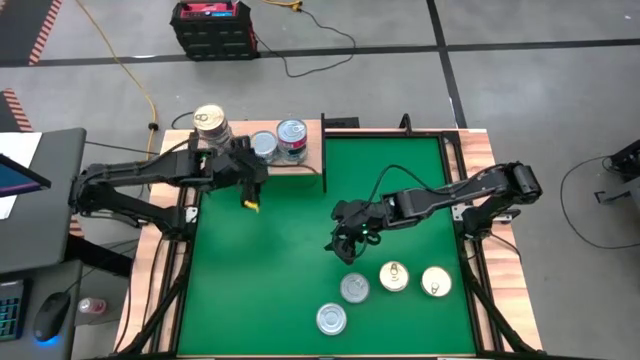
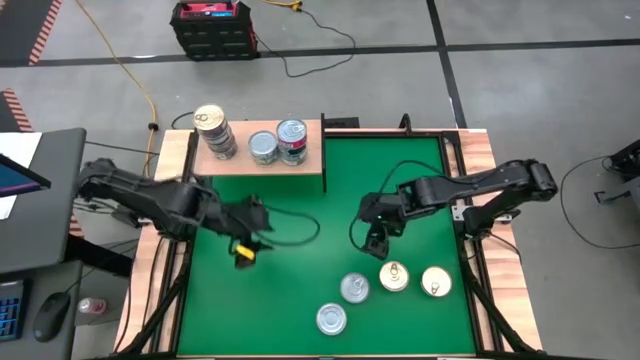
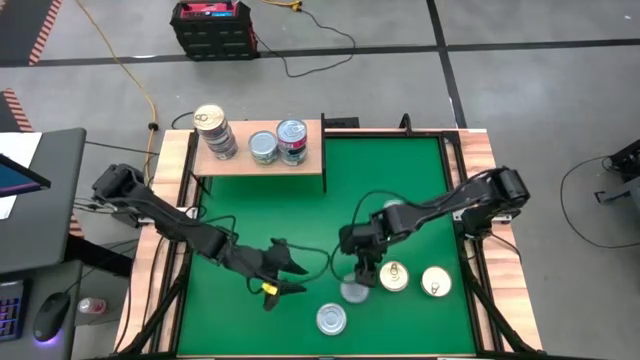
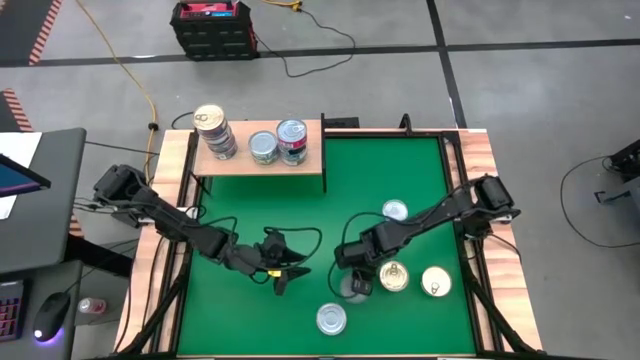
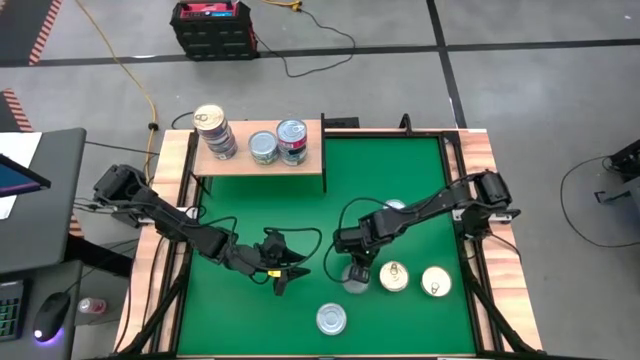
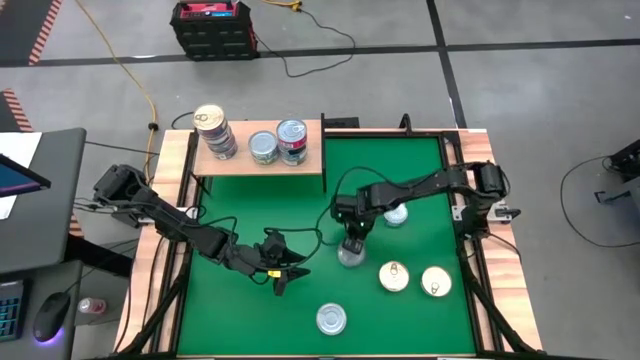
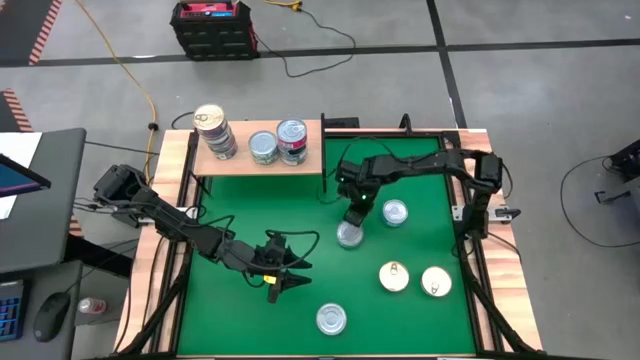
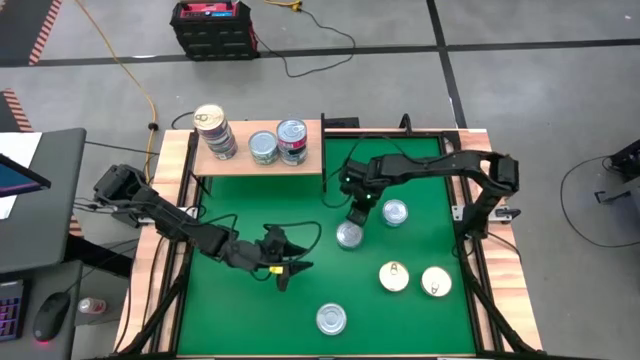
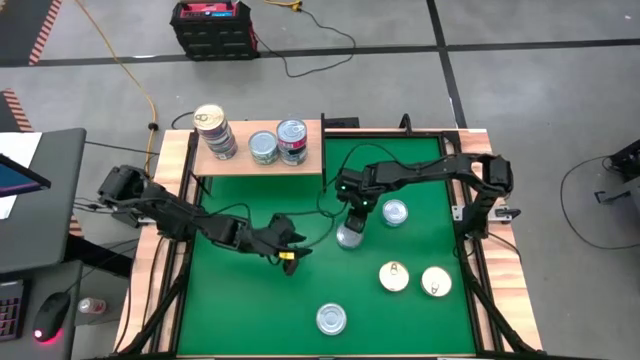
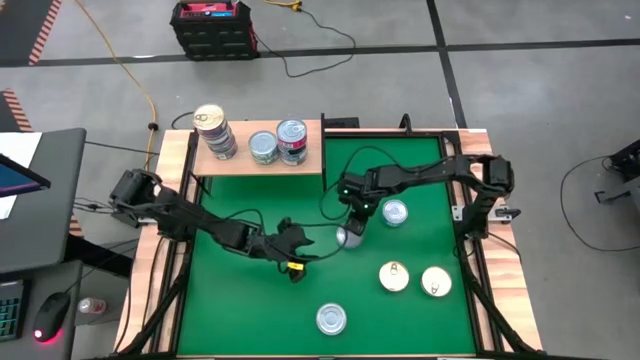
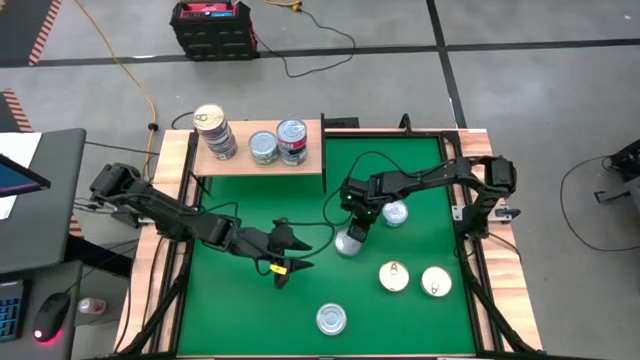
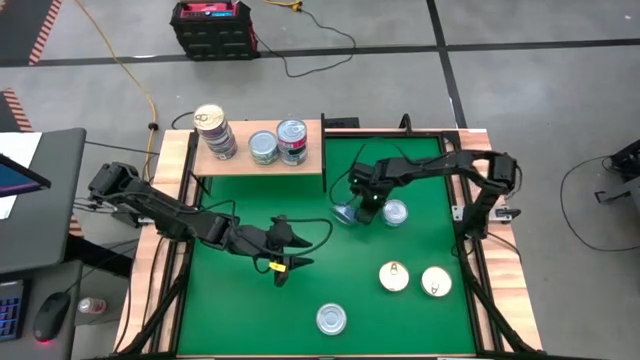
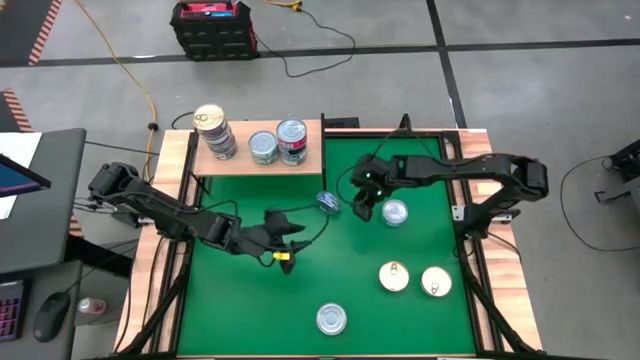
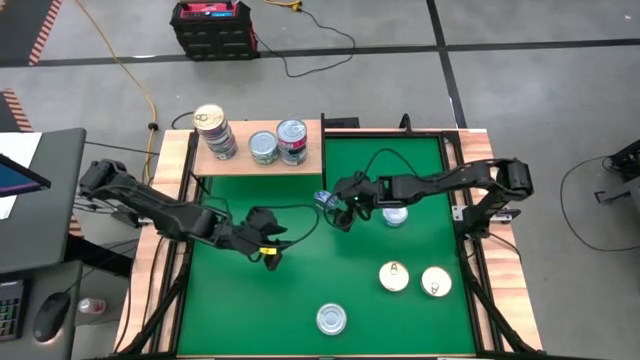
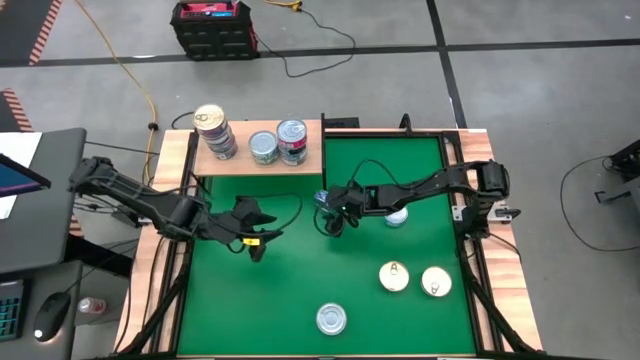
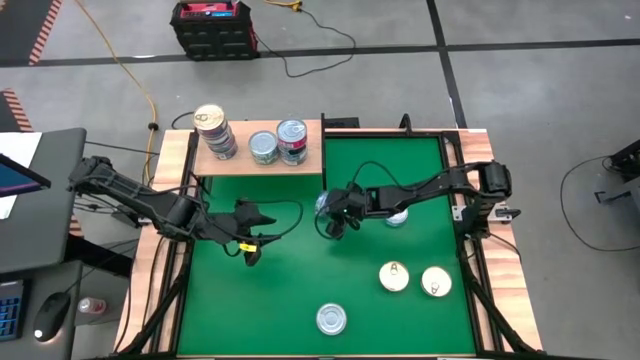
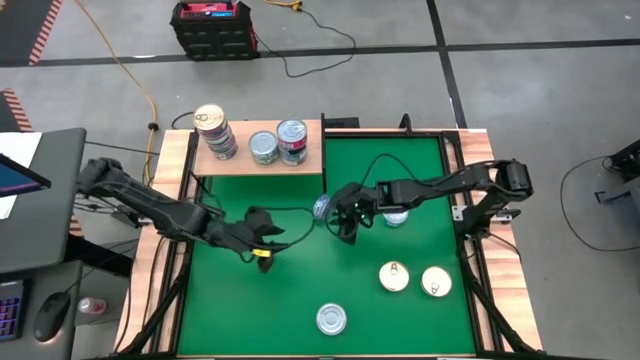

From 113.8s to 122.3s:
Task: Stack canned seafood by type on shelf
Stack the dark blue tuna can on top of the red tuna can on the shelf

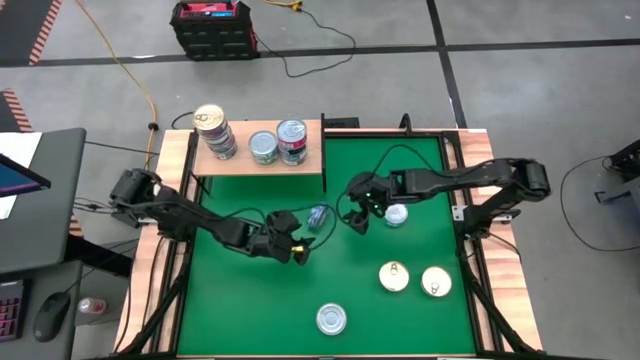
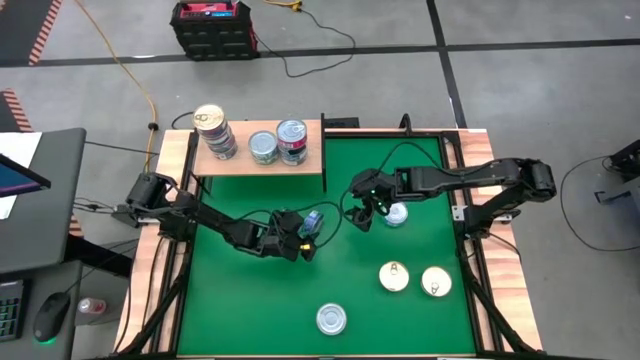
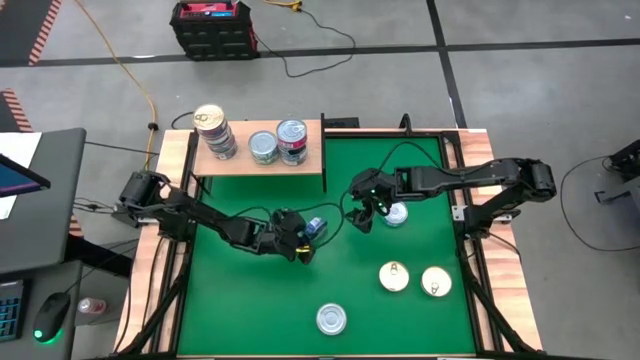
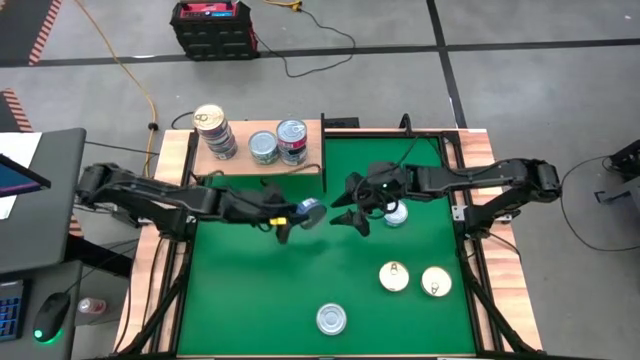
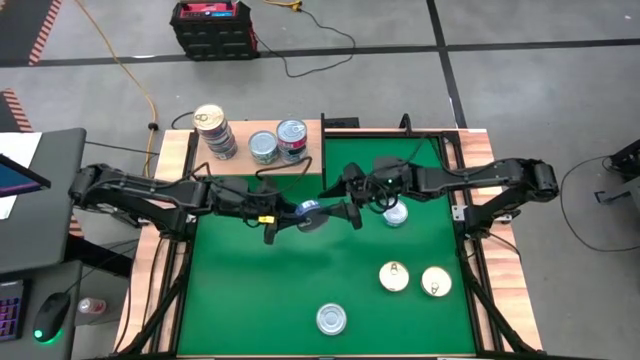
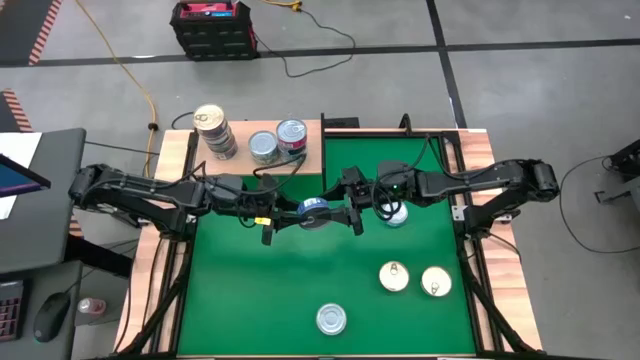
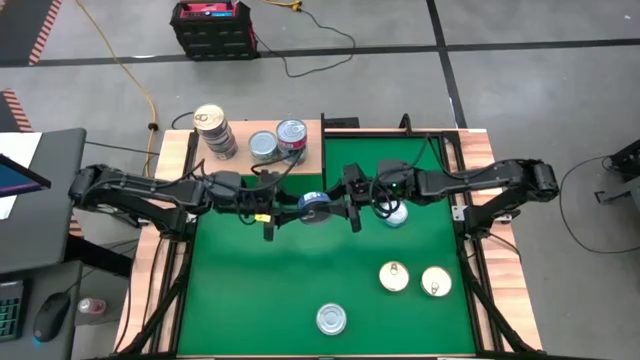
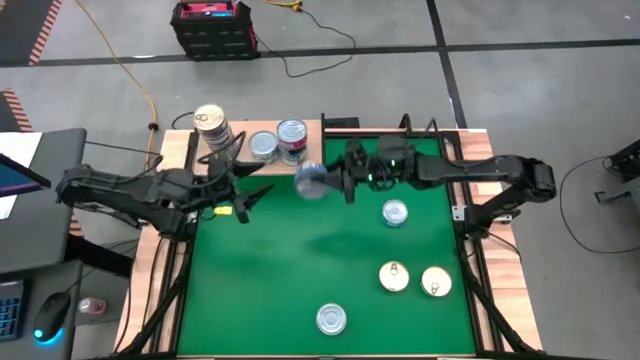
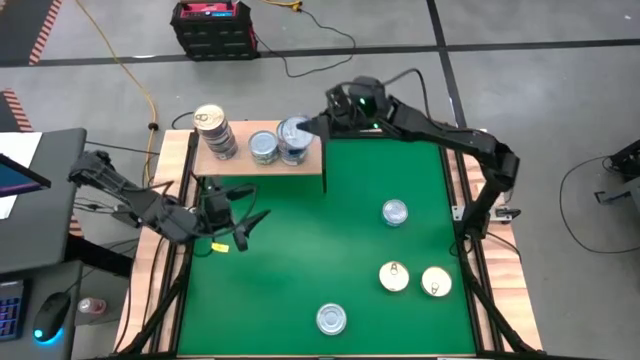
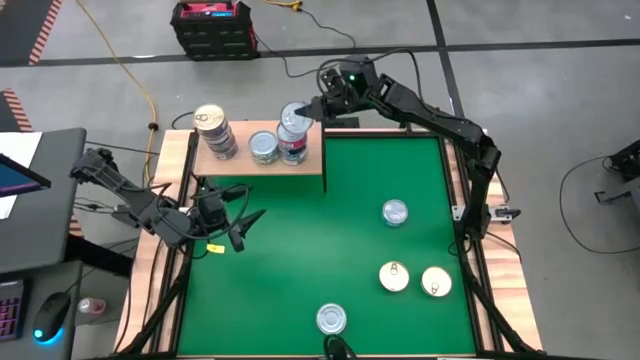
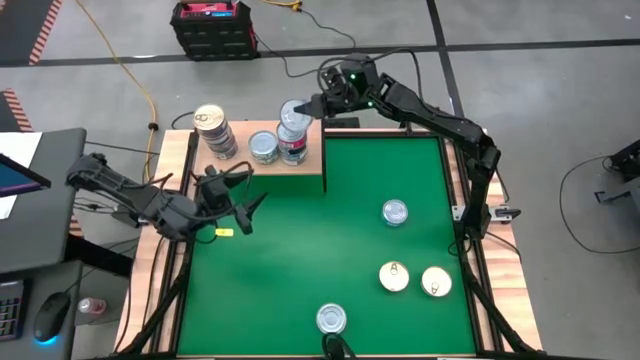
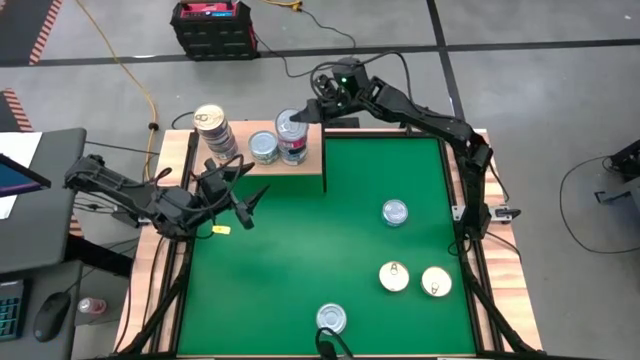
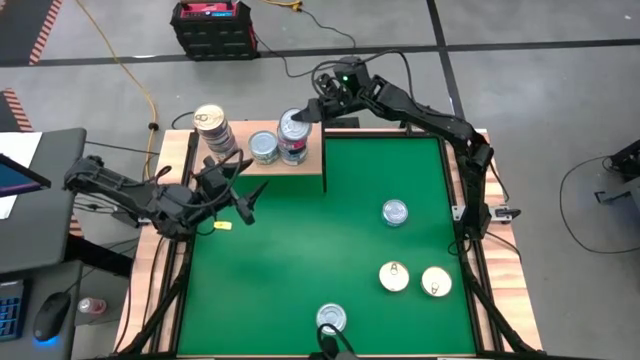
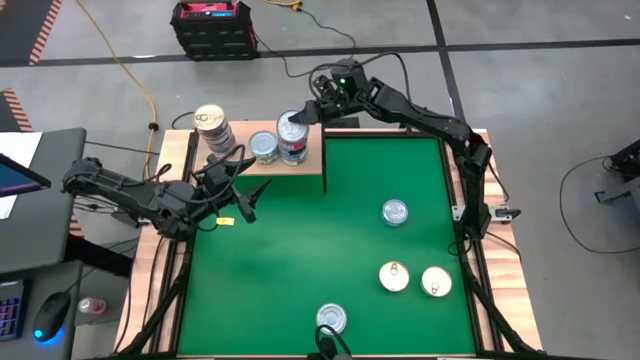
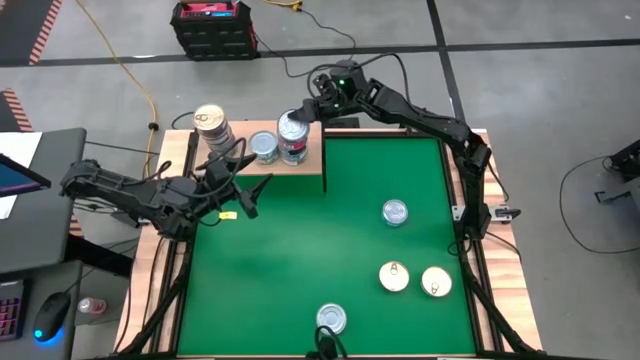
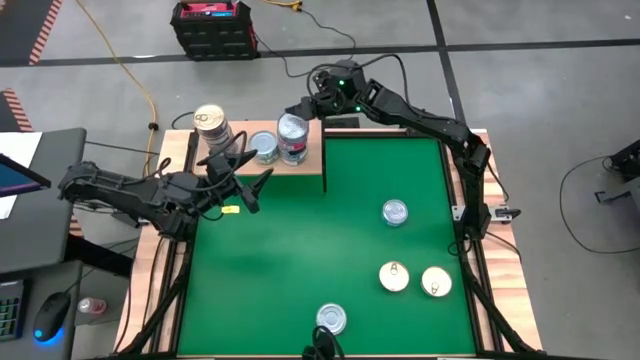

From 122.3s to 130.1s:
Stack the dark blue tuna can on top of the red tuna can on the shelf

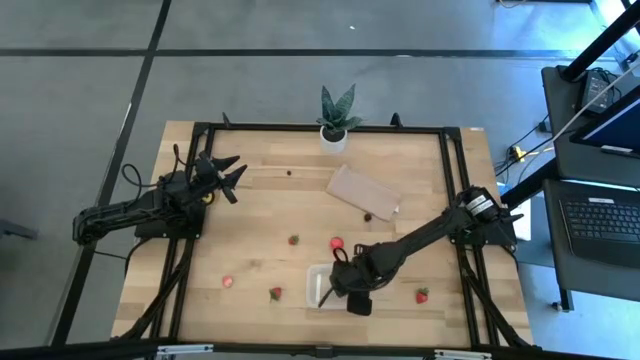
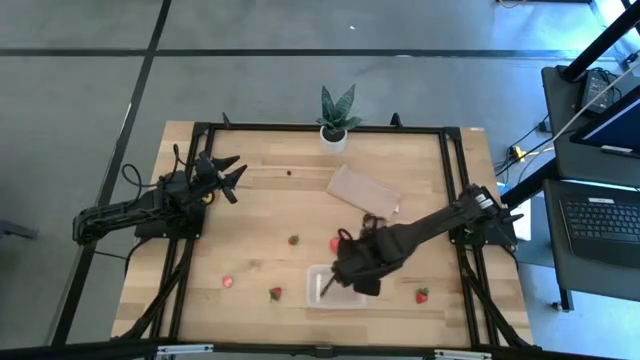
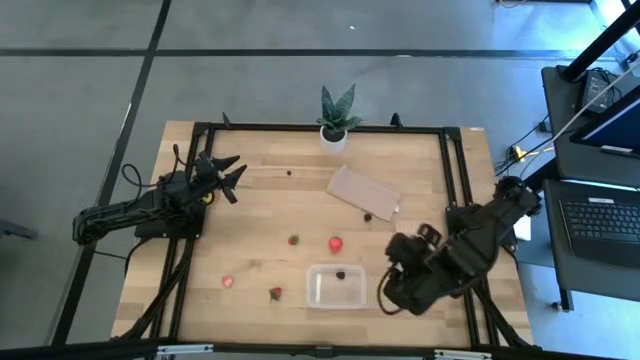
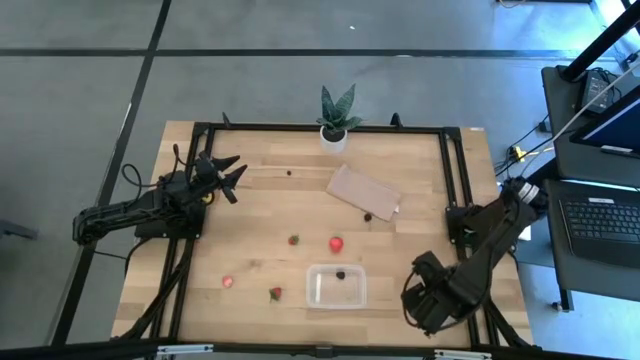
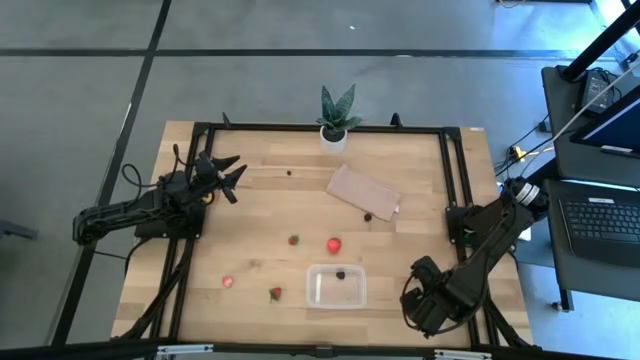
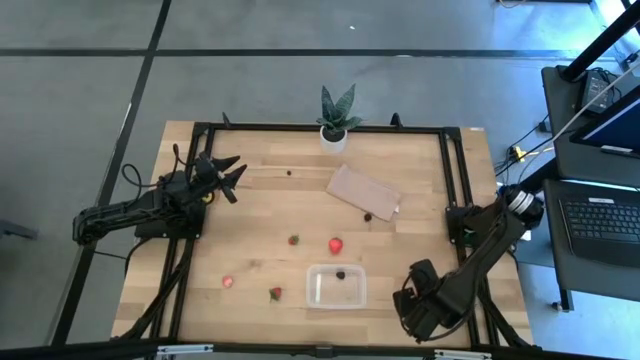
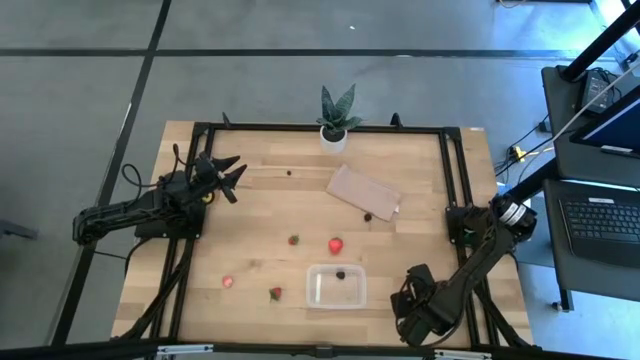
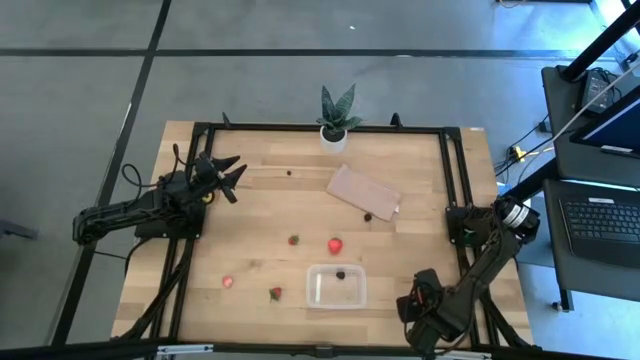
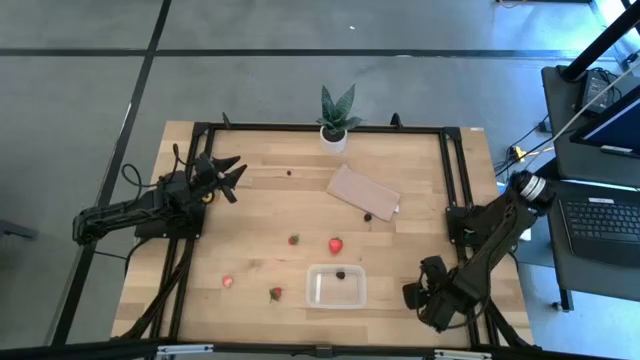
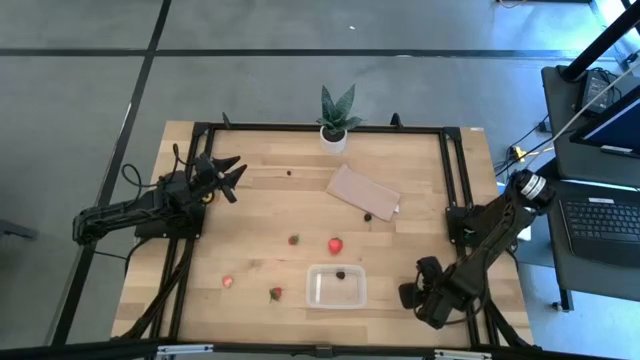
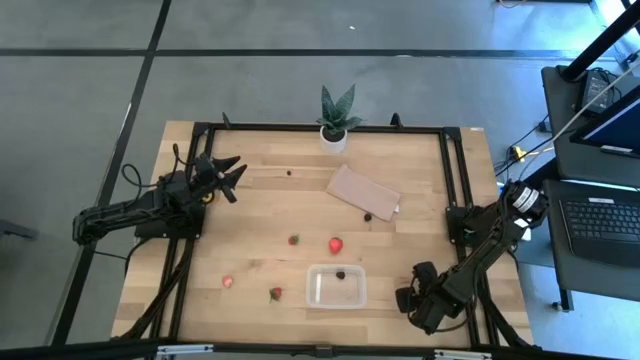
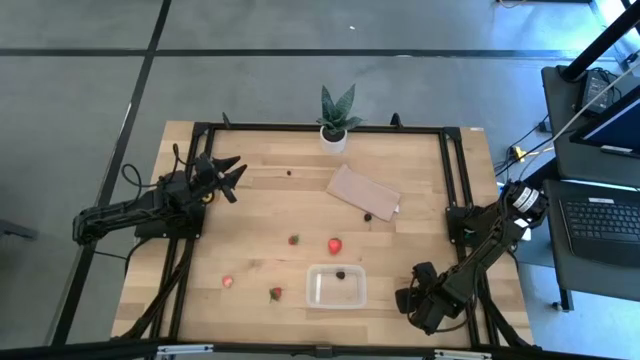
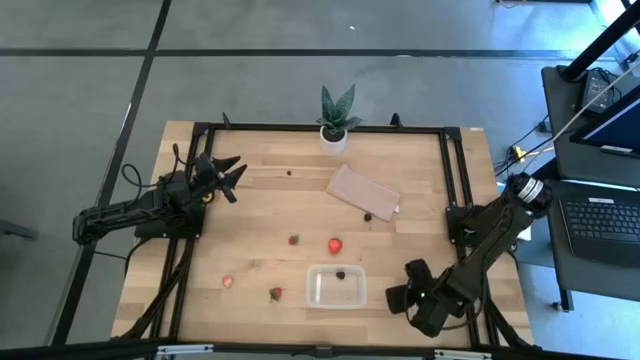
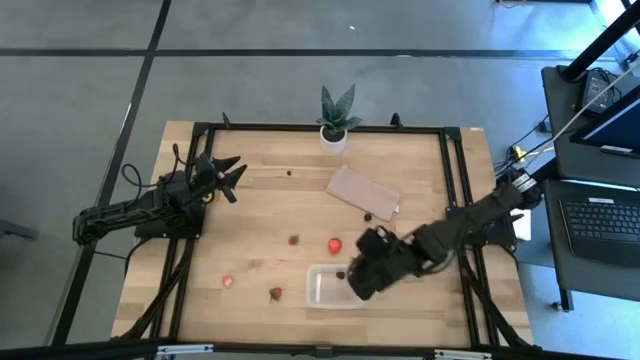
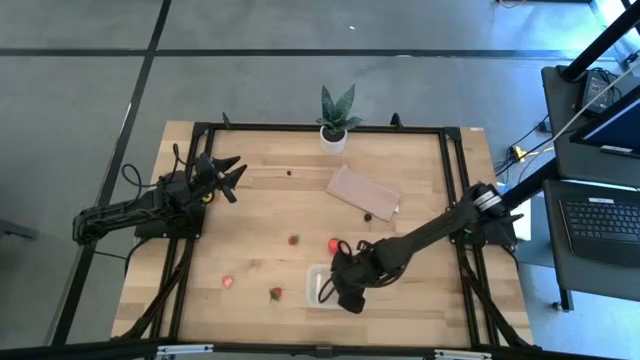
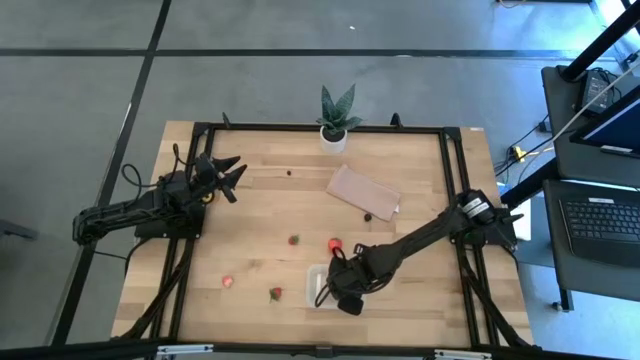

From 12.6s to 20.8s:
Task: Pick and placing Produce into tupperware
Put the red strawberry in the bin
